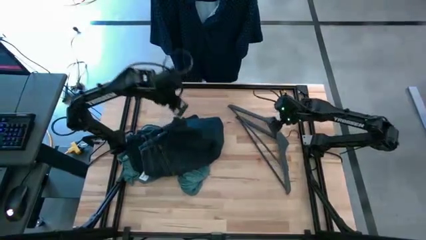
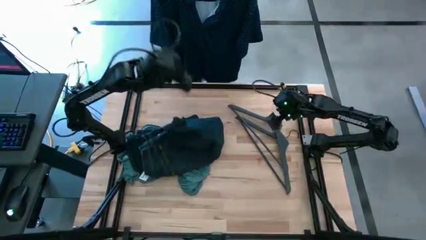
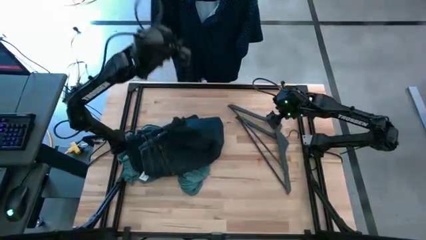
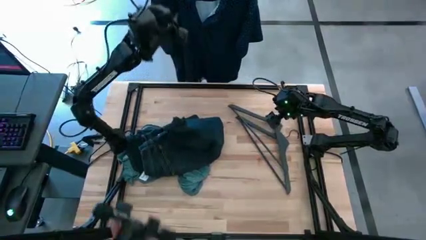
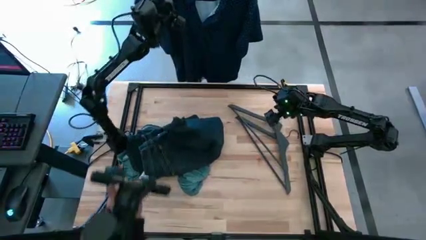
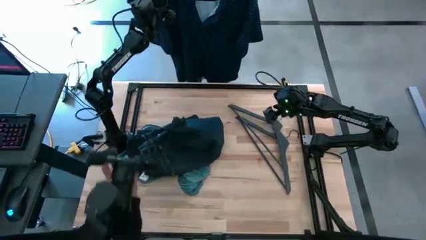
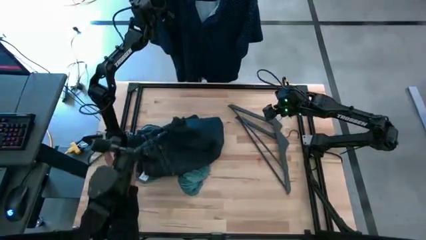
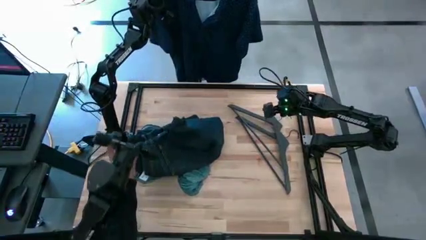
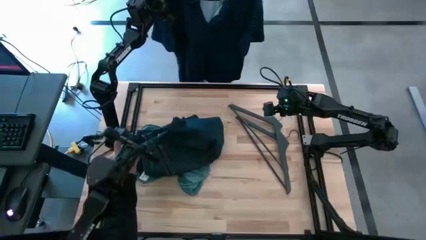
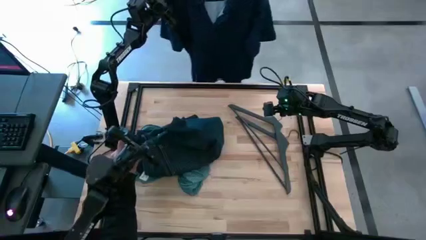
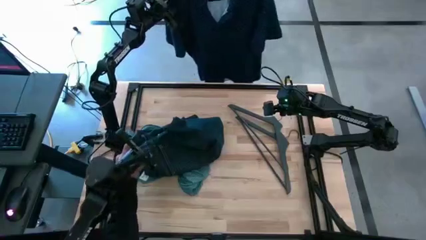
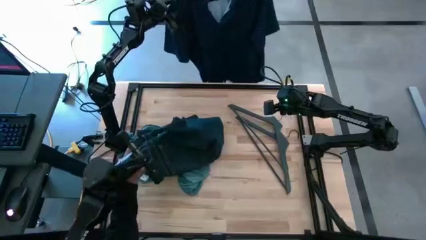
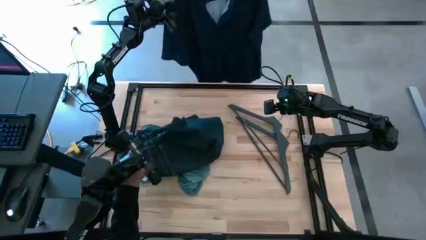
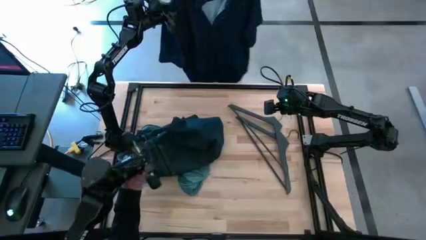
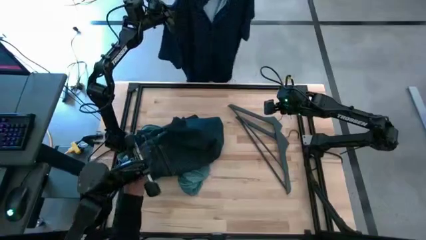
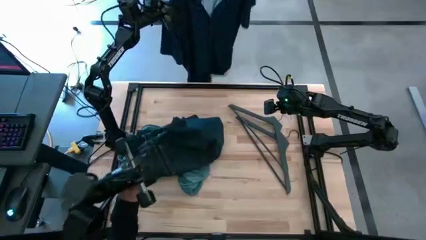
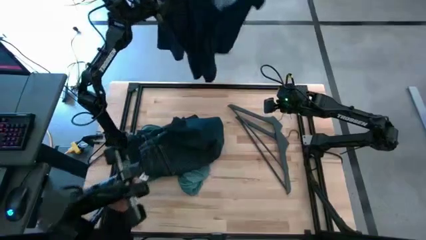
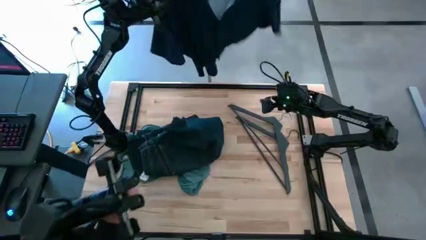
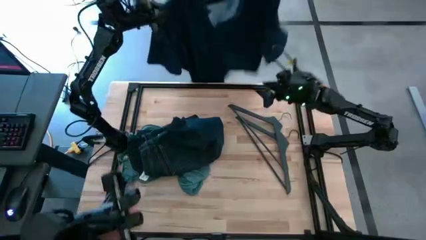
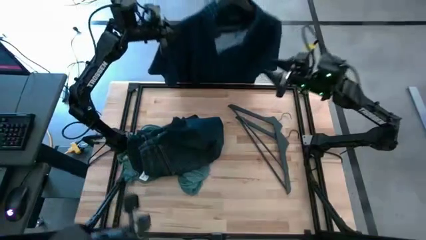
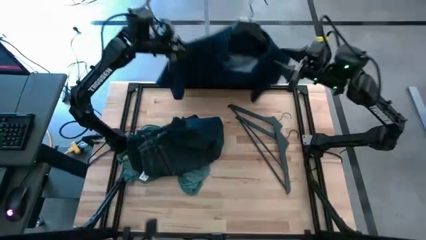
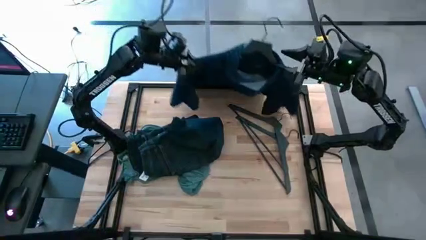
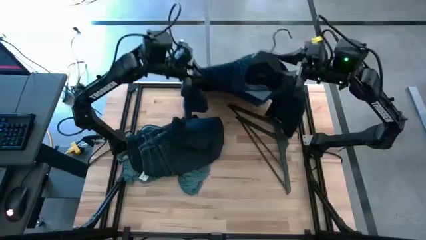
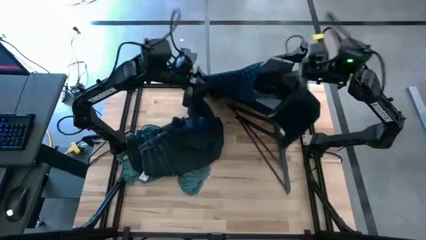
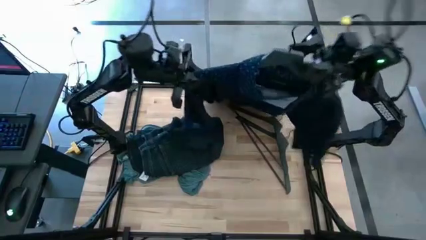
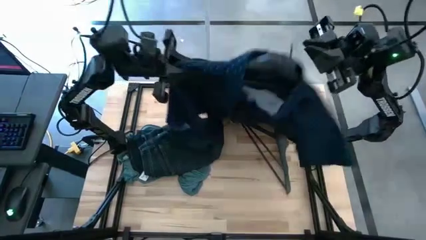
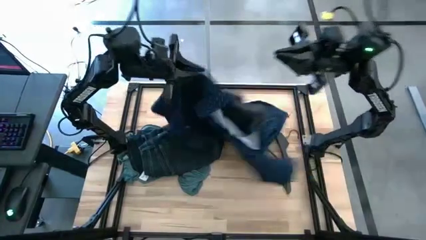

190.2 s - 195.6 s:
Task: Hang clothes
Unhang the hangered blue polo shirt from the hanger rack

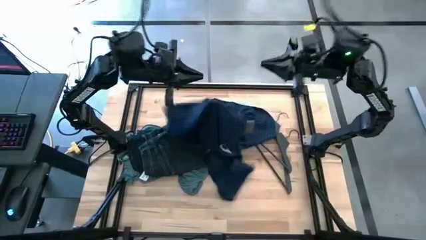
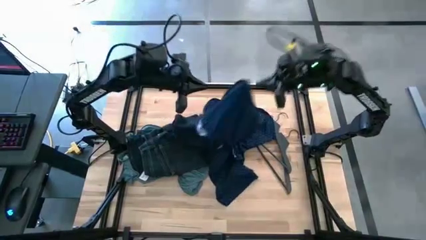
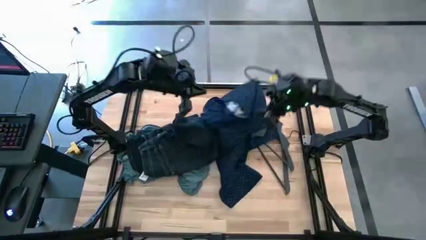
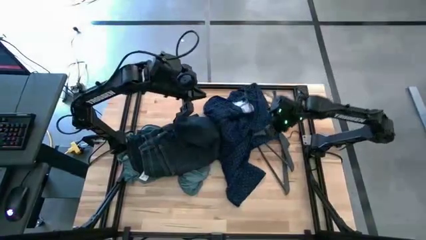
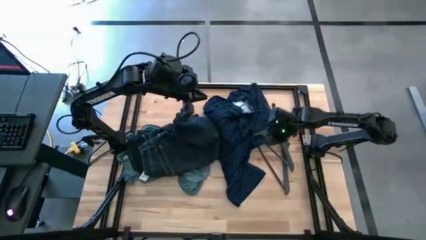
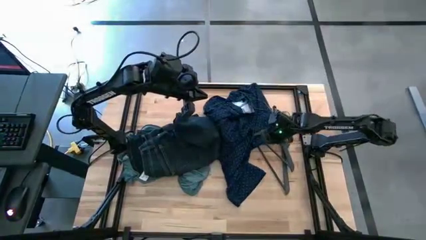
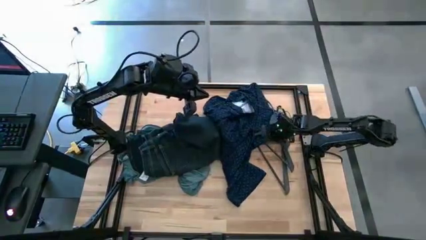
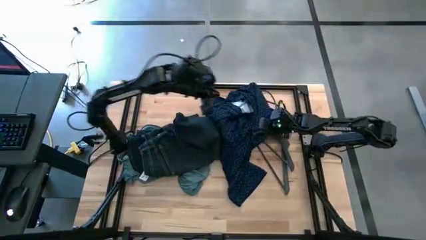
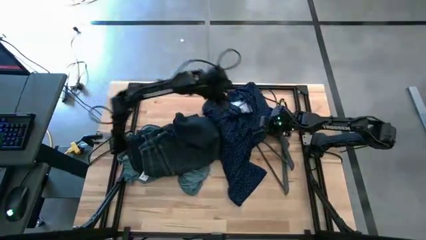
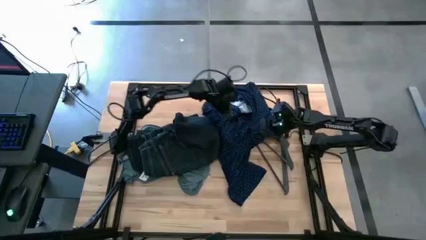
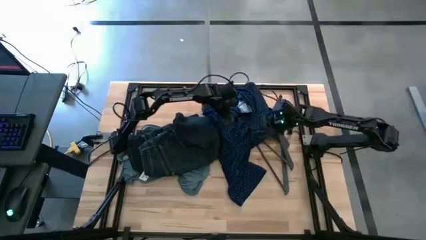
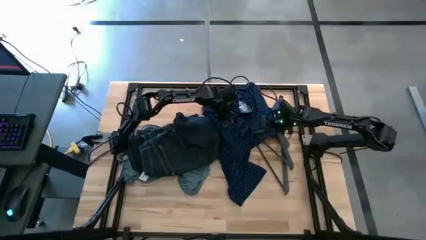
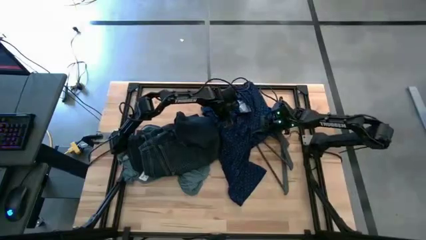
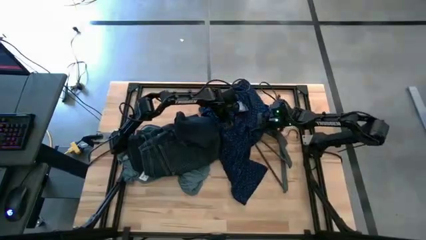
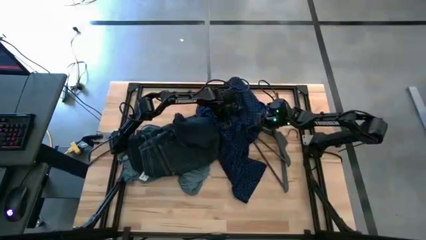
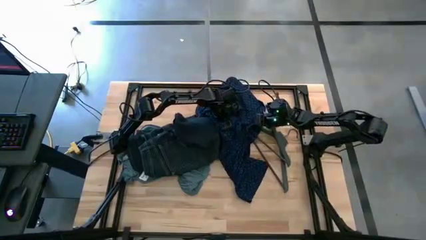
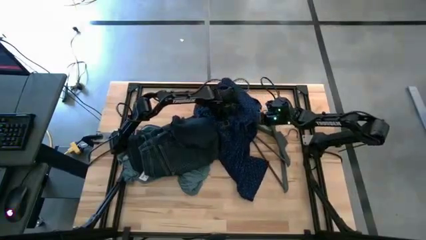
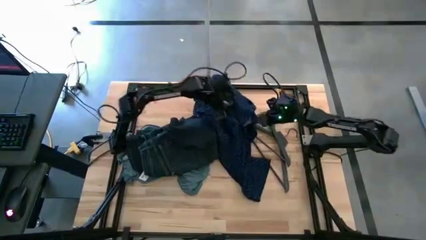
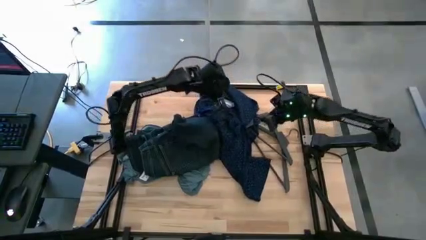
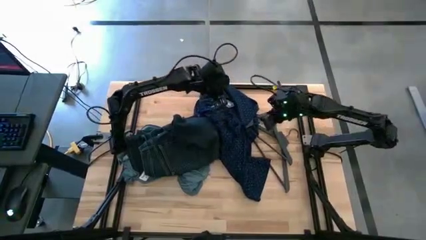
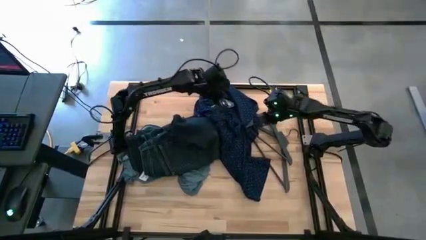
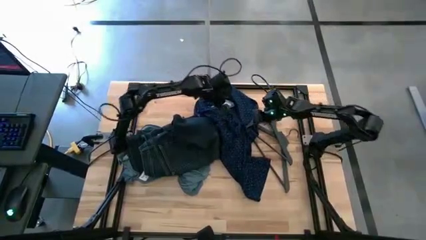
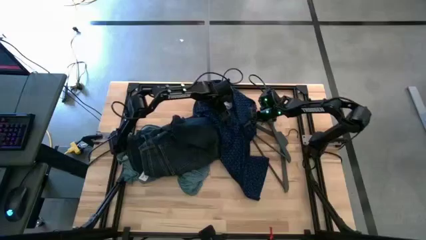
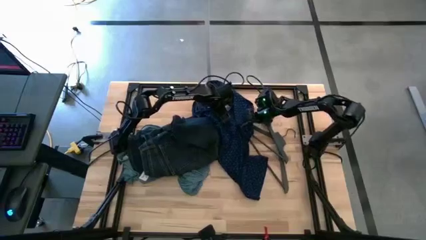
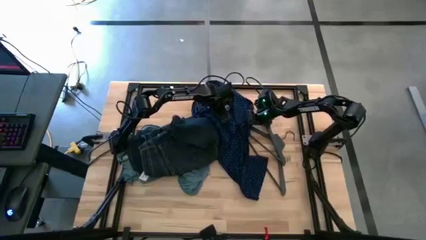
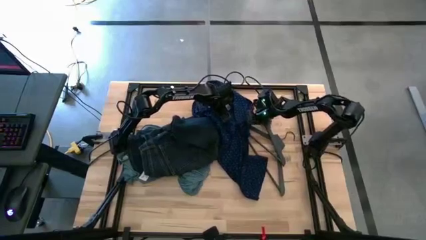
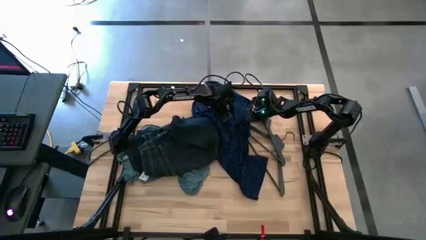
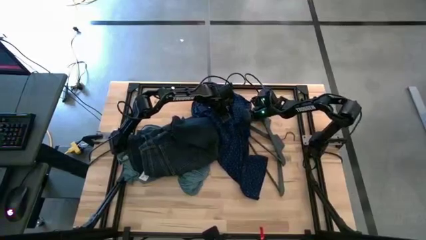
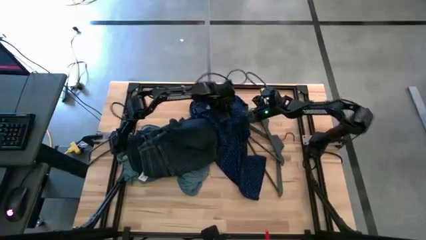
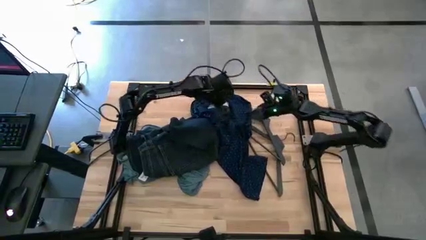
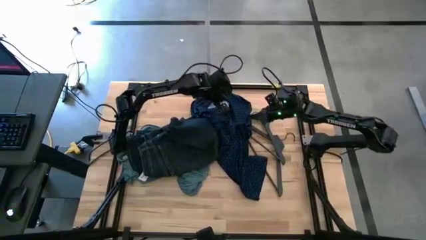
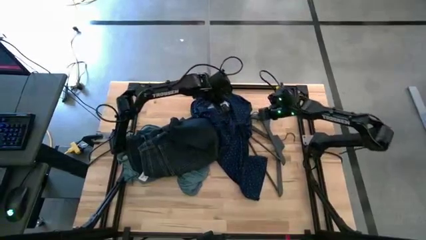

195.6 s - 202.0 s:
Remove the hanger from the blue polo shirt

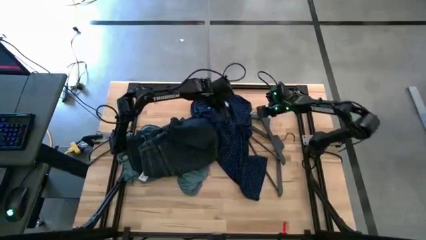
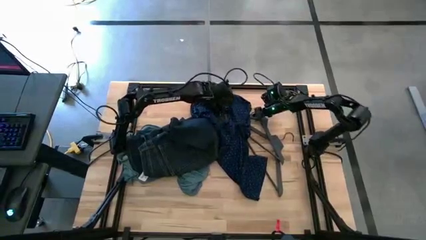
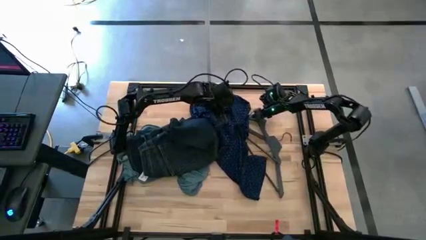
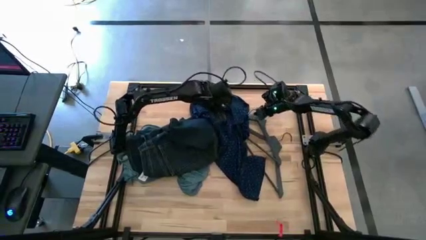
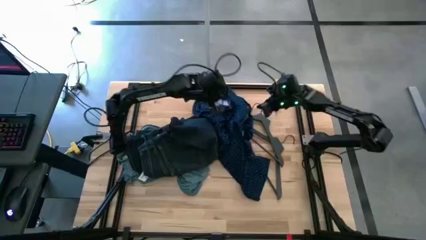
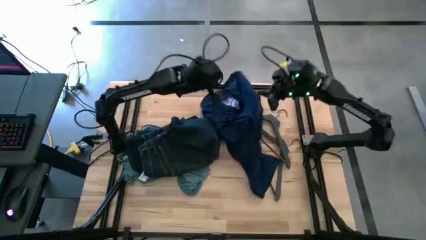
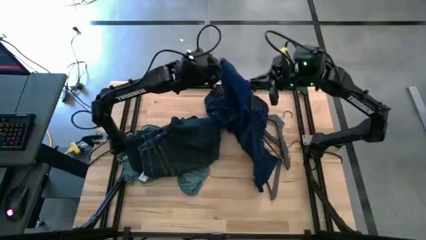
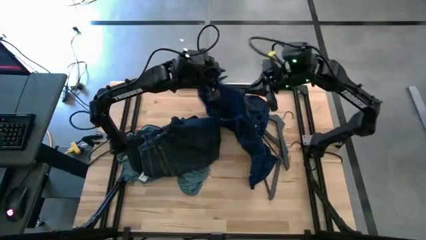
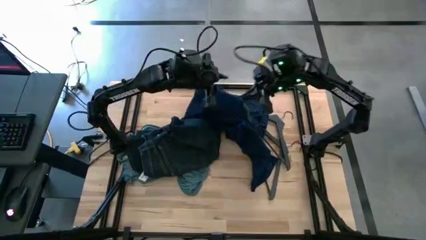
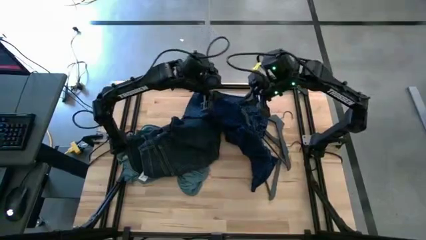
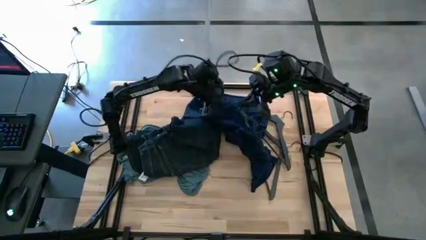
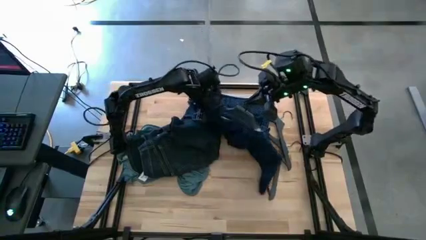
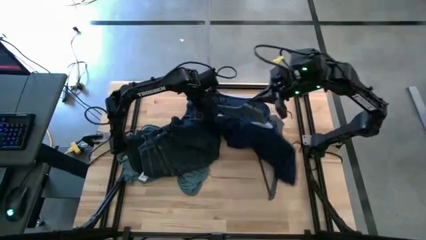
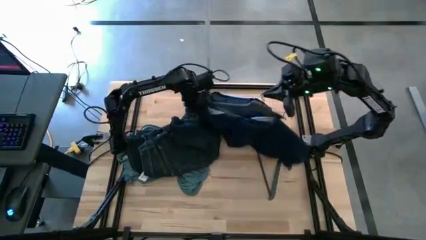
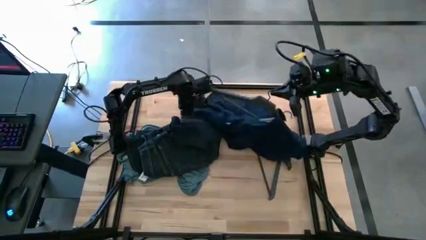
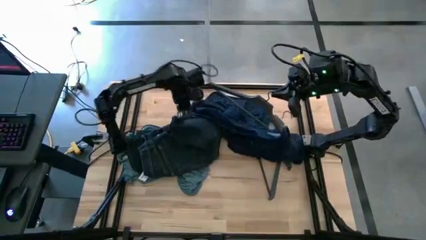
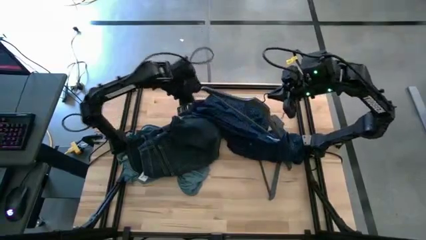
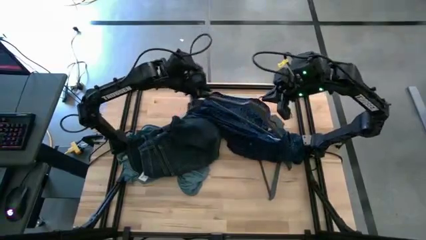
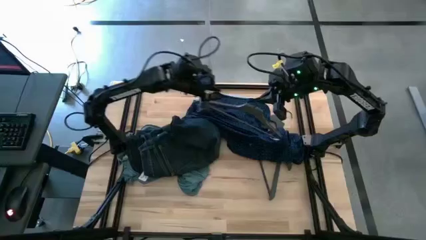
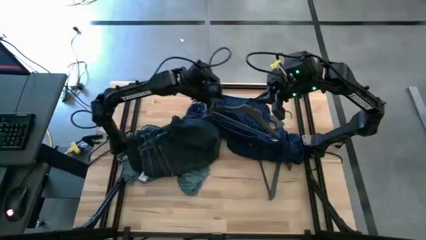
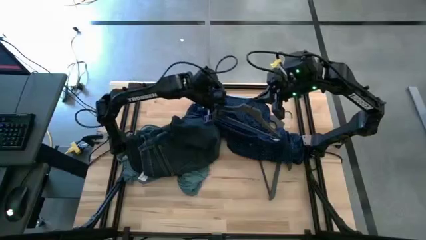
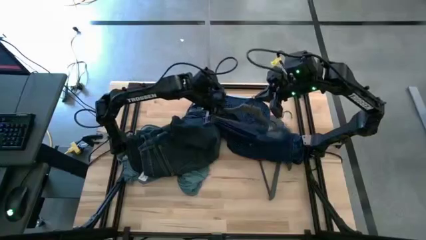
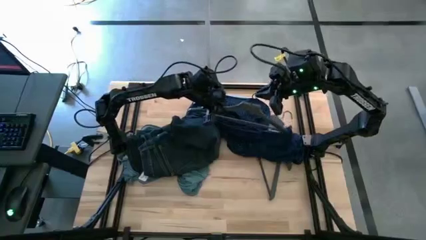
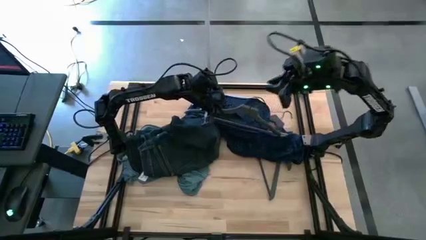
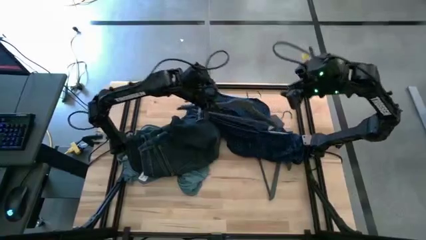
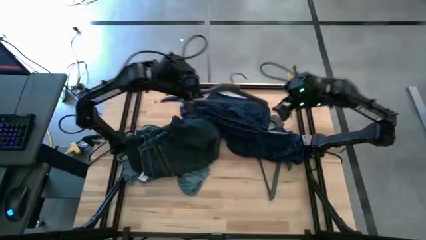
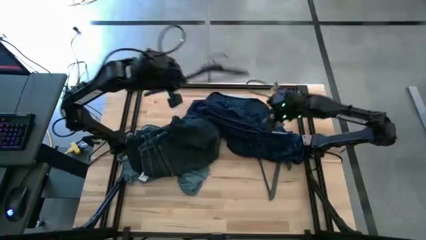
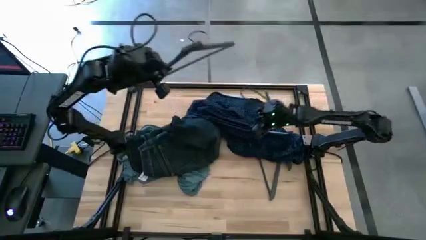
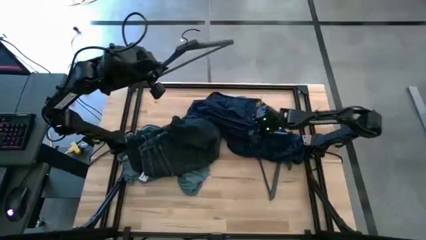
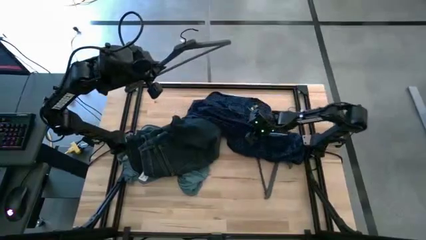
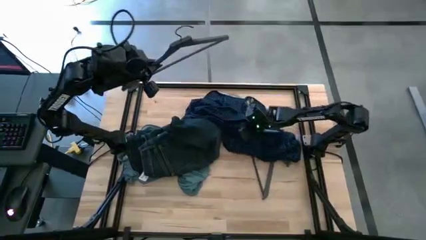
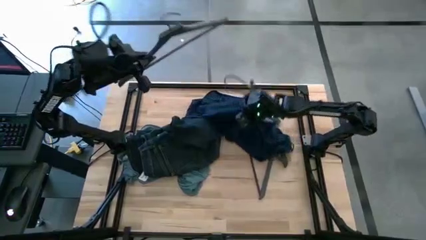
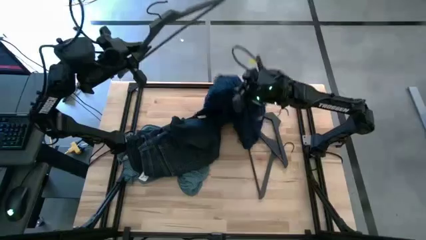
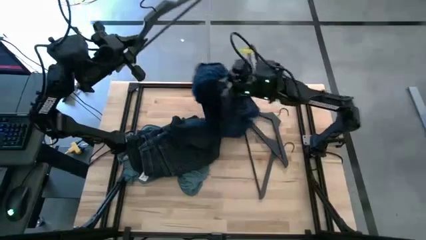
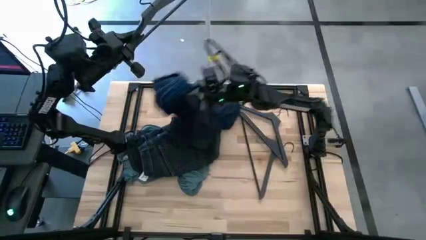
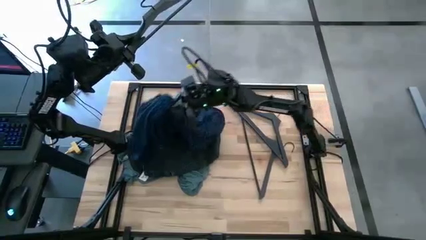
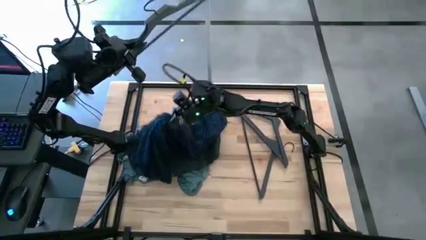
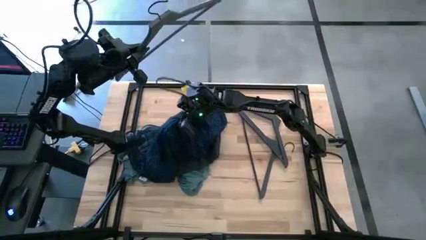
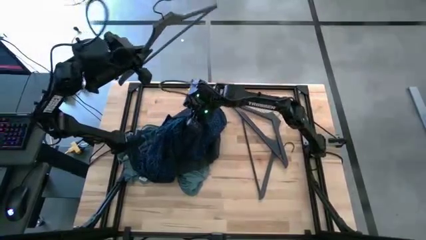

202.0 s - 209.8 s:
Remove the hanger from the blue polo shirt
